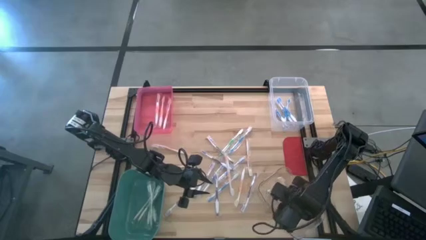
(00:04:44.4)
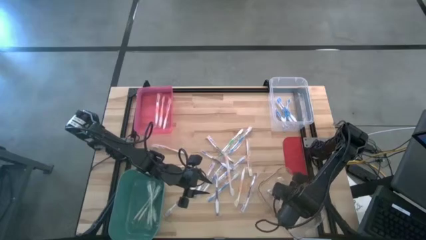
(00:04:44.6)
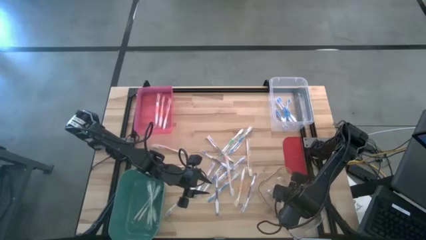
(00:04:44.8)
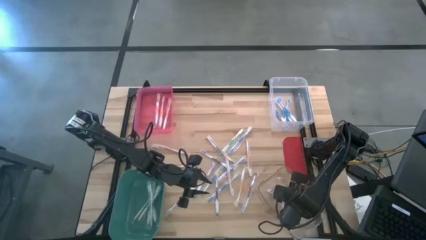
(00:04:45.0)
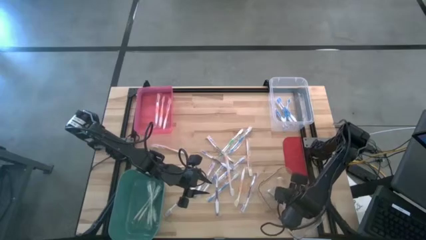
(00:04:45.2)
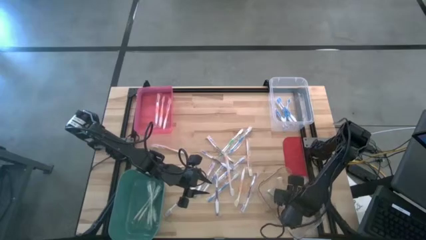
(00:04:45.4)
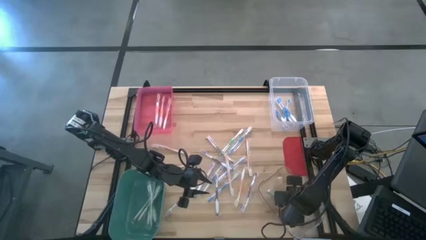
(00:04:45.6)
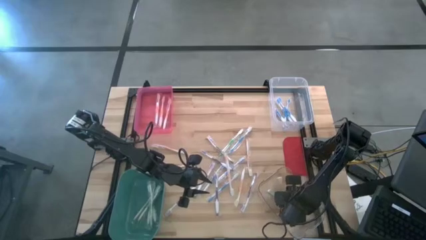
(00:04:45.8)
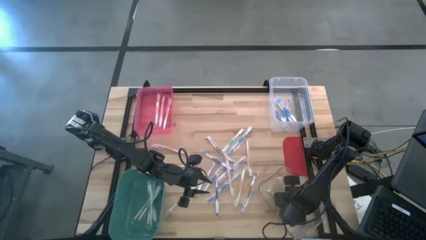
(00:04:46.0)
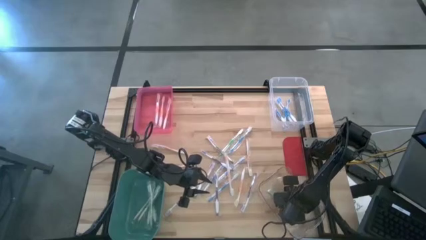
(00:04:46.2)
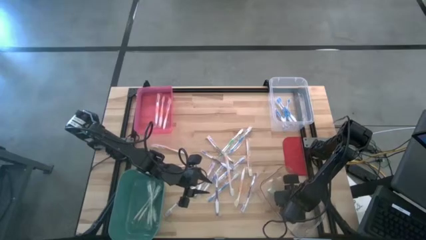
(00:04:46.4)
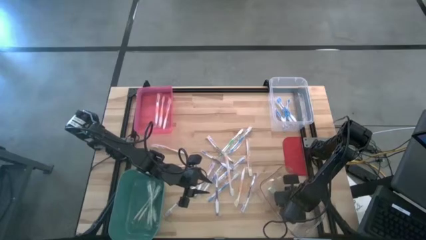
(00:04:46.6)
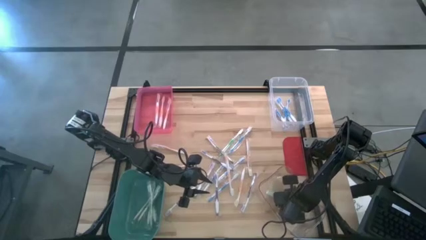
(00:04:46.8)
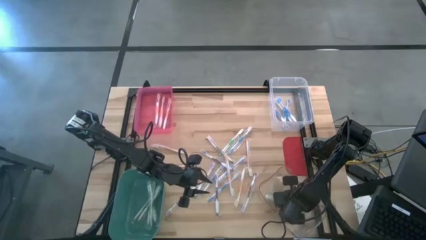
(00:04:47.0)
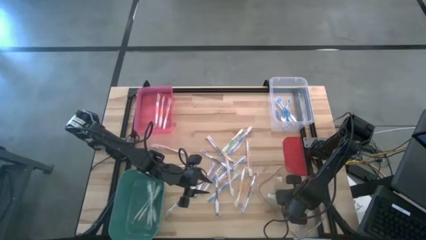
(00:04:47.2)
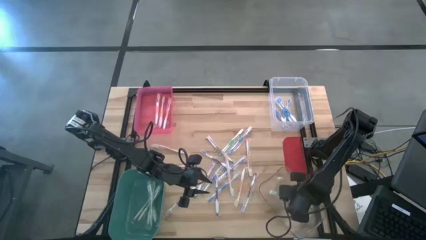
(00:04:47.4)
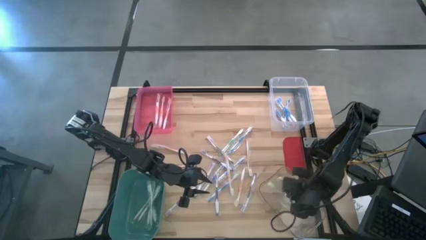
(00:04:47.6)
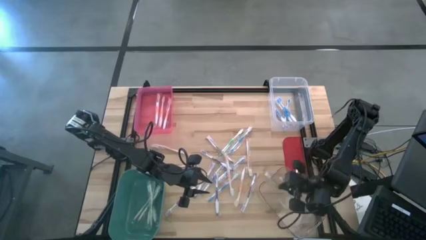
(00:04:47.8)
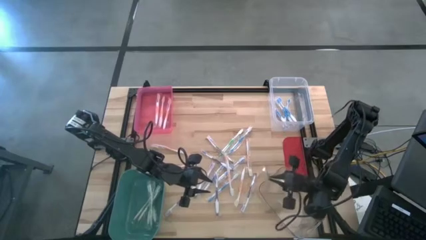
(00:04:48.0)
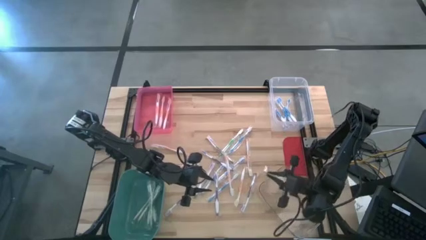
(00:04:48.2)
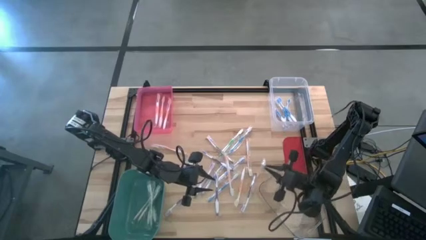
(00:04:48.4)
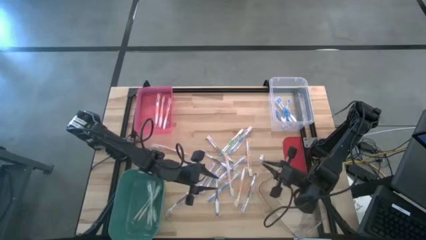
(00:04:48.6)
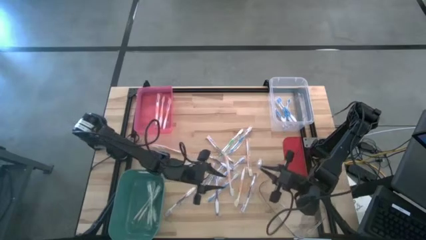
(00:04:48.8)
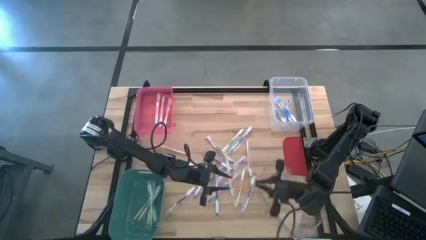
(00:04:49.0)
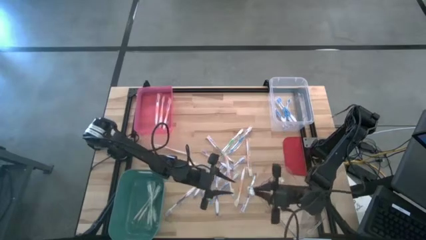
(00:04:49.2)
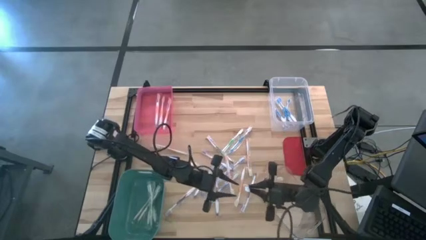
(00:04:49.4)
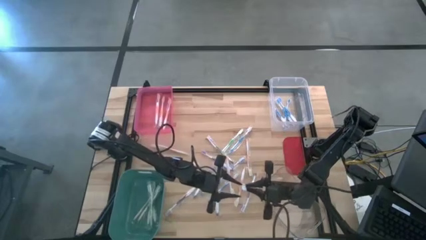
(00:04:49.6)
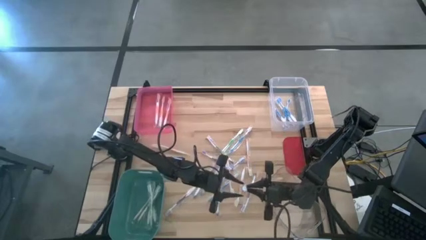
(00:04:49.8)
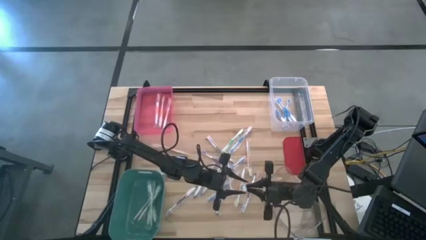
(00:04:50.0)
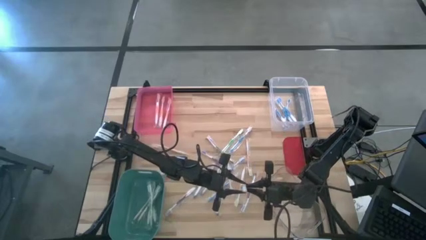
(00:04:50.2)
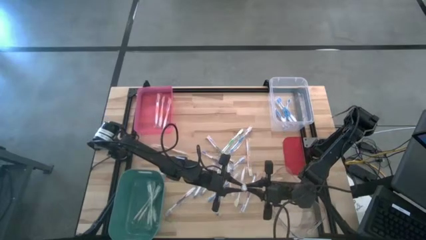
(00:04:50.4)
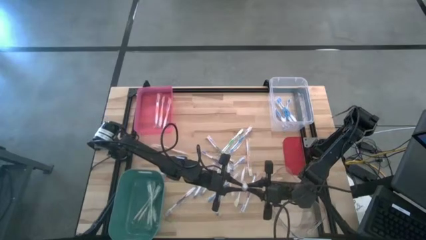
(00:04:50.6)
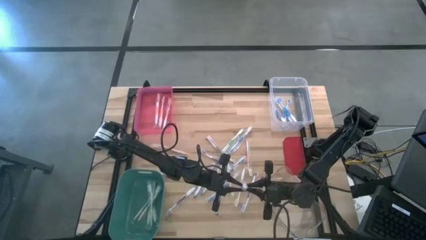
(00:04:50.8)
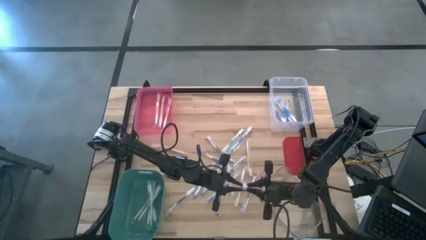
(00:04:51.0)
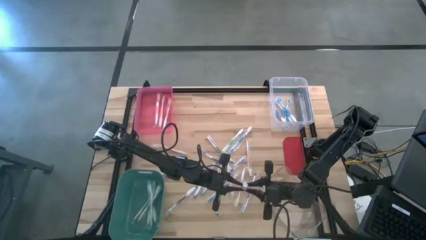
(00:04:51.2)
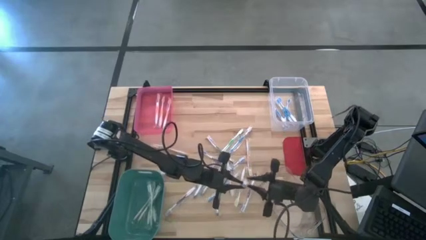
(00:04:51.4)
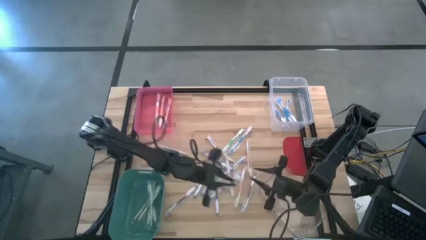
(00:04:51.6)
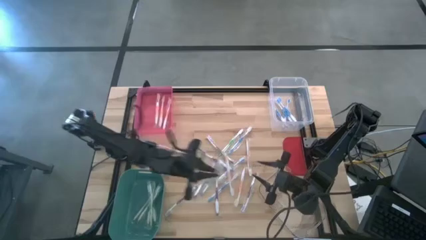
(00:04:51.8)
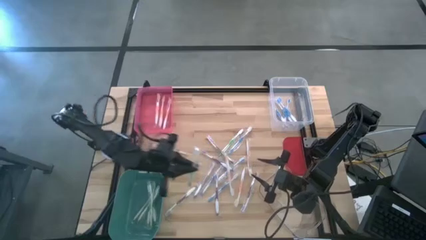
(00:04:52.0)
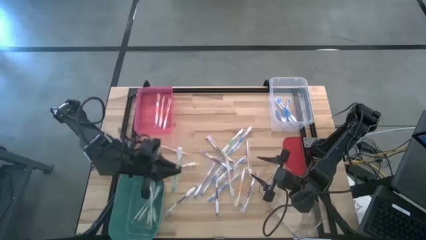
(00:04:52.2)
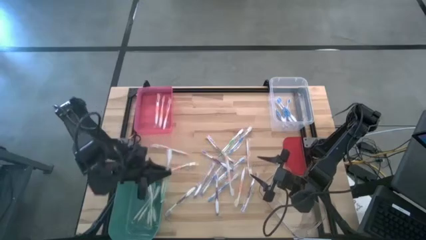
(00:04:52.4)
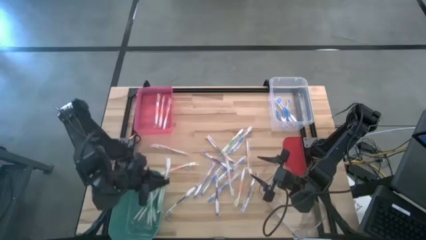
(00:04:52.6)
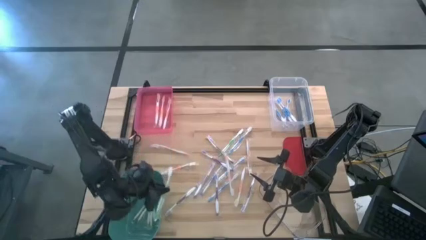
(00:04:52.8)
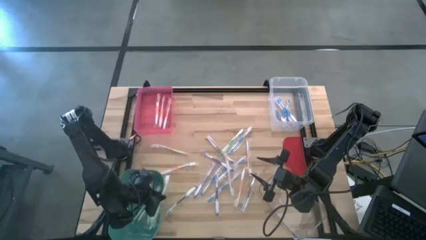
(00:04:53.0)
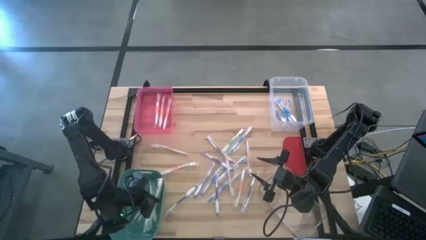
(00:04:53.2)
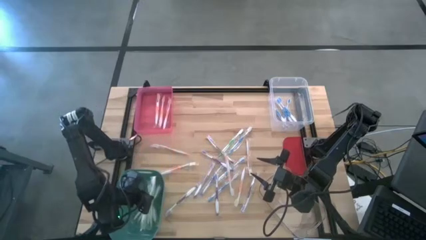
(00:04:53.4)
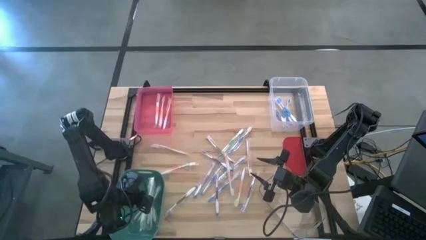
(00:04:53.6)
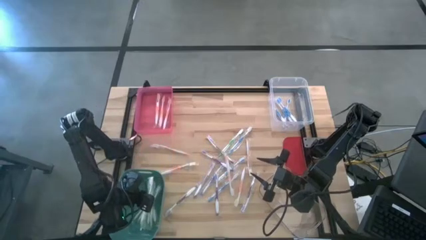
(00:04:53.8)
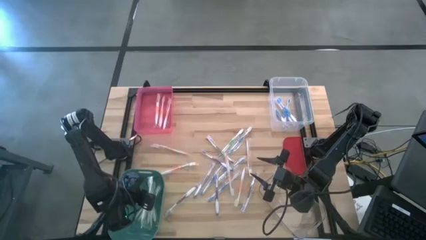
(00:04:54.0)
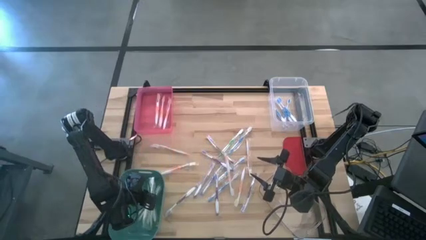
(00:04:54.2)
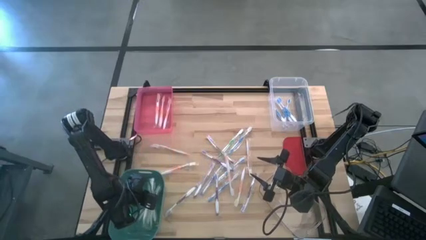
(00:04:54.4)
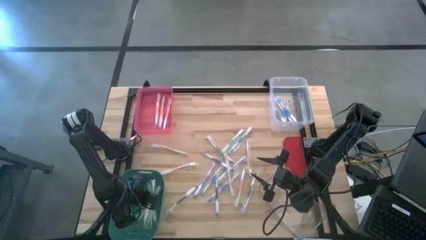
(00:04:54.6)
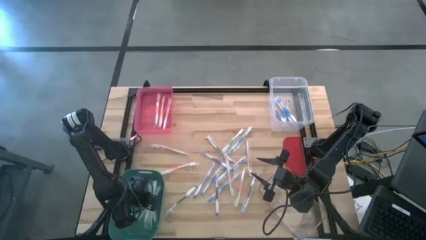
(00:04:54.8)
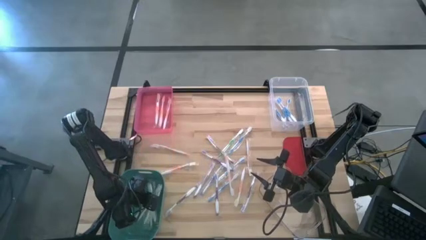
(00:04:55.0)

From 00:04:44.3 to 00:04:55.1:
Task: Pick & Place Toothbrushes
Put the green toothbrush into the green bin

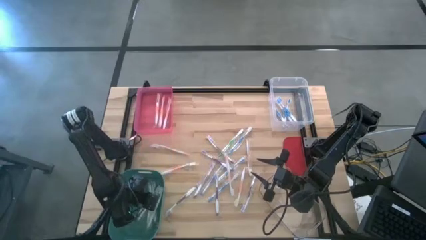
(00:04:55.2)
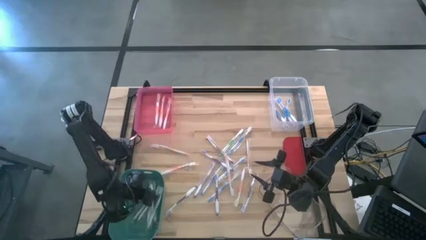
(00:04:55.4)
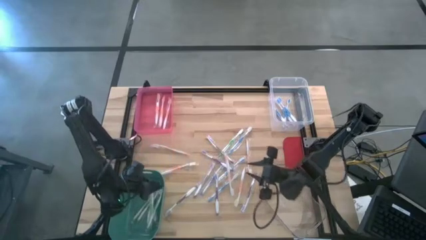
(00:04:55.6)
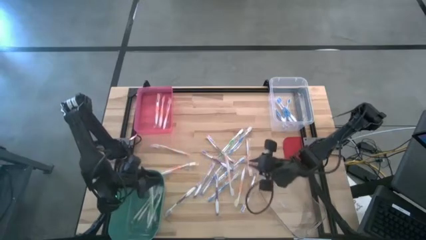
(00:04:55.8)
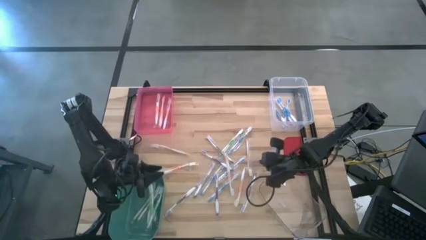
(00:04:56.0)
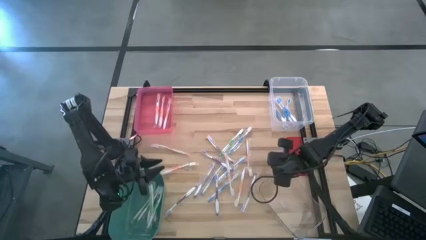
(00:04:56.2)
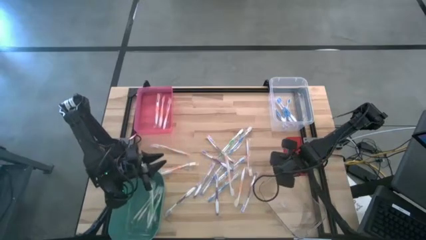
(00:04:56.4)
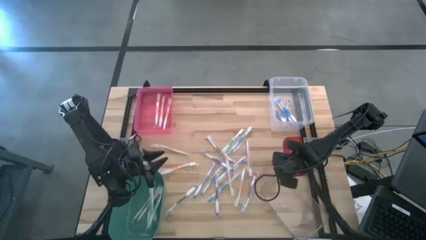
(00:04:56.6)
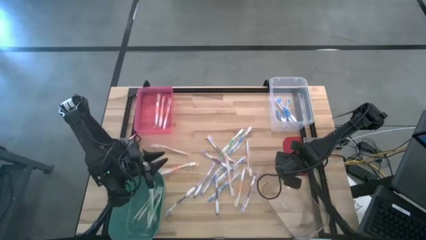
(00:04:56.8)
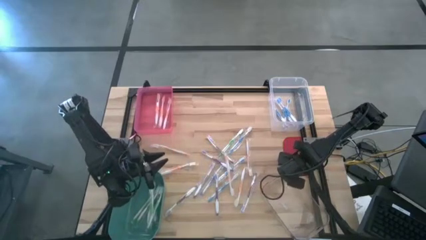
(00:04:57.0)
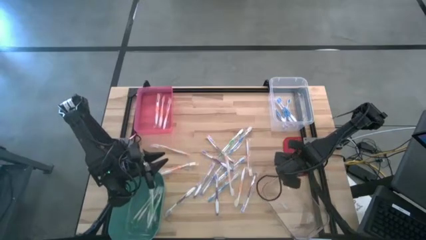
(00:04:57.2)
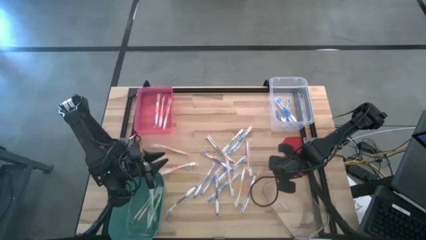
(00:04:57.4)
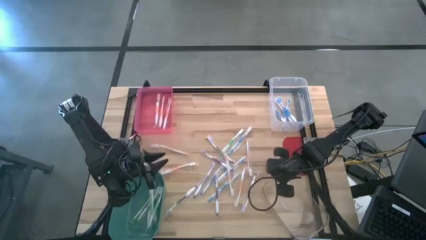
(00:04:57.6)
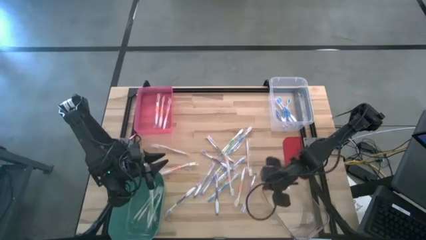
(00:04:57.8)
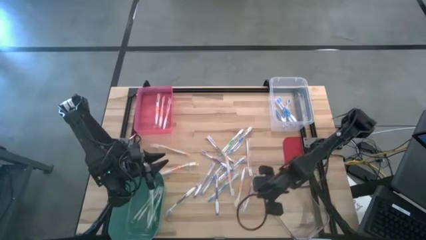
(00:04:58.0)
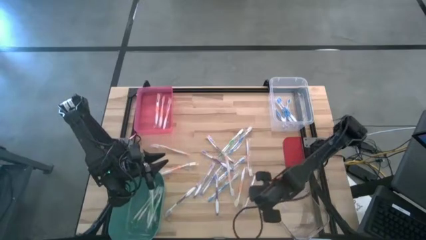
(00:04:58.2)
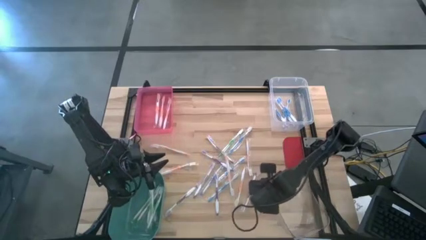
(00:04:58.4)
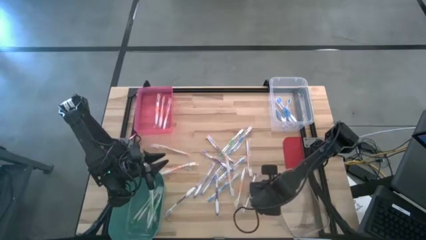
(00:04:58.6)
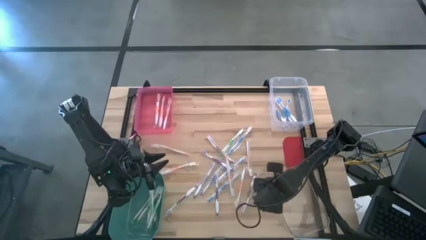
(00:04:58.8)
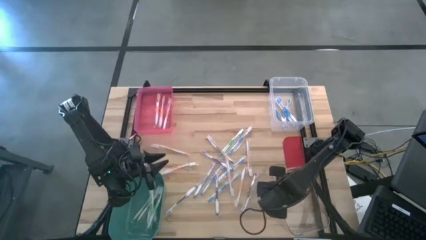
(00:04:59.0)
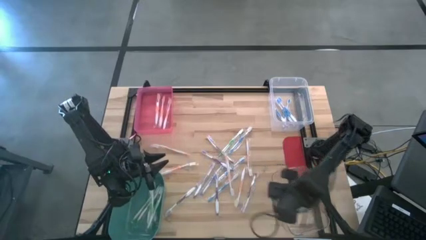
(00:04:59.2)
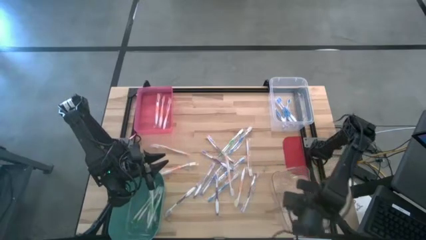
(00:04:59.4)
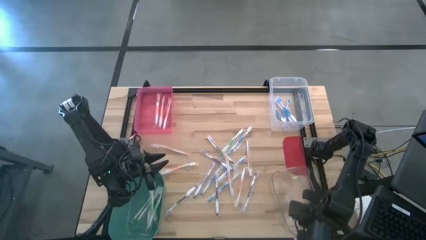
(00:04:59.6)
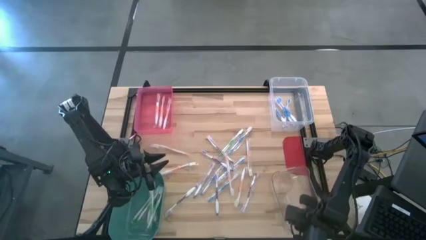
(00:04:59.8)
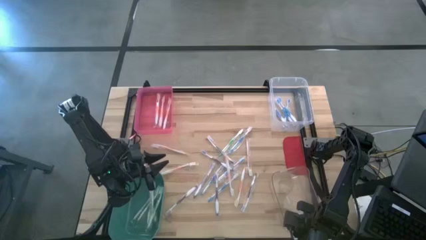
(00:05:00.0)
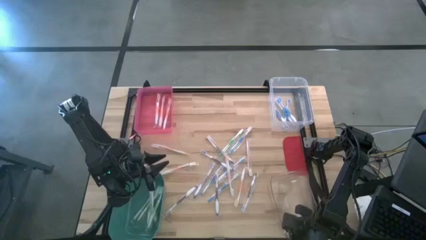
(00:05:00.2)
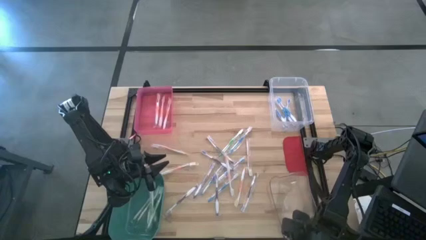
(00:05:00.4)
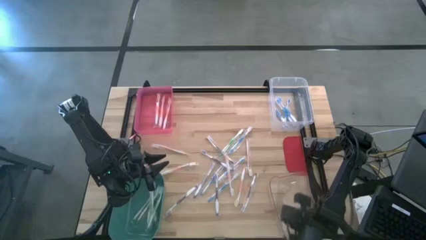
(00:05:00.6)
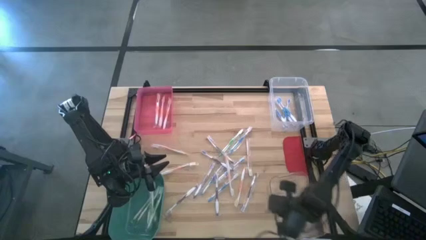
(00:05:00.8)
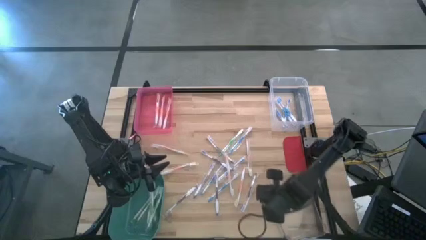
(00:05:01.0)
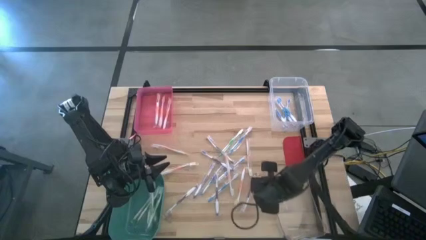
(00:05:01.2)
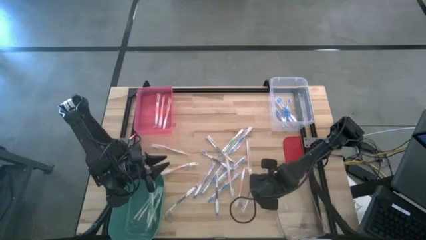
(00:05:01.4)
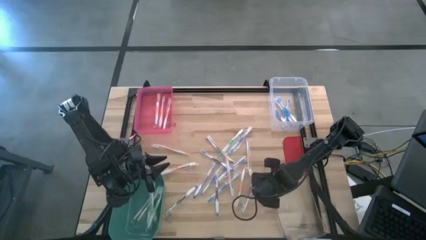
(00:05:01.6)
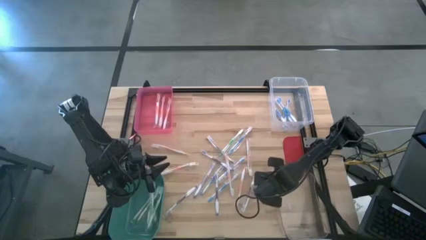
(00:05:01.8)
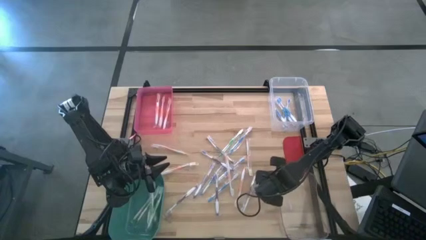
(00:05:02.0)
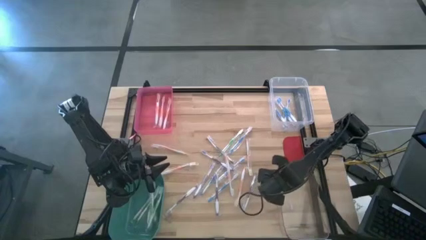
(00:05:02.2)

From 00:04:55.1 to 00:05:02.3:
Adjust the bottom transparent bin
